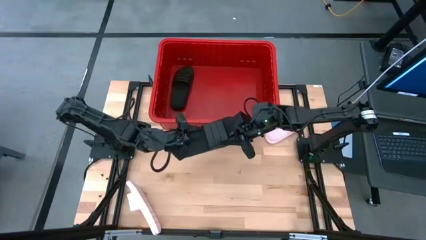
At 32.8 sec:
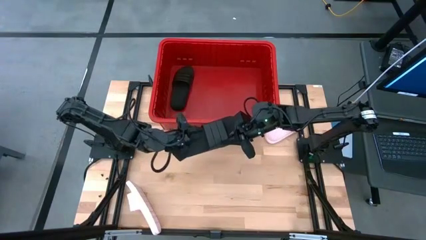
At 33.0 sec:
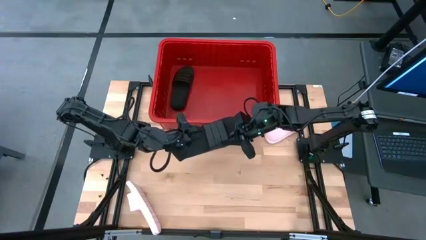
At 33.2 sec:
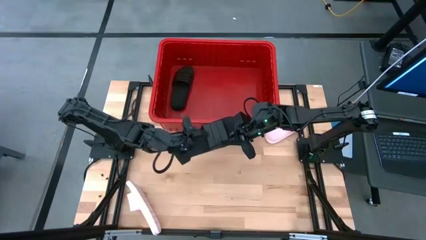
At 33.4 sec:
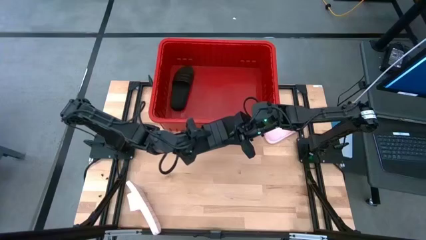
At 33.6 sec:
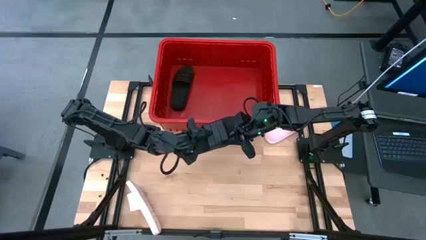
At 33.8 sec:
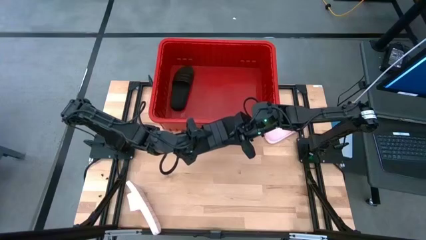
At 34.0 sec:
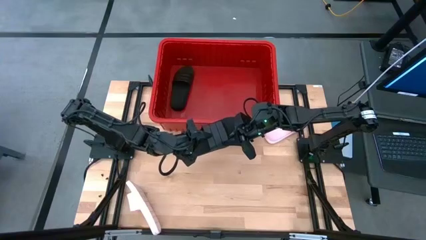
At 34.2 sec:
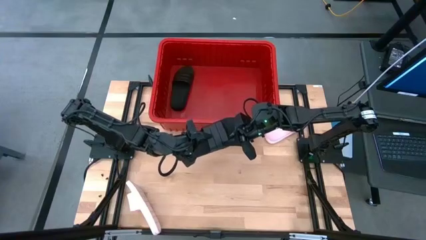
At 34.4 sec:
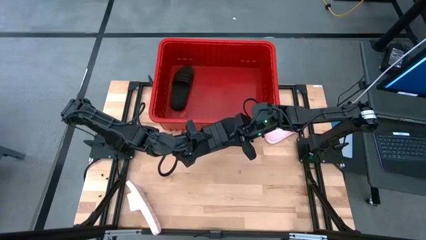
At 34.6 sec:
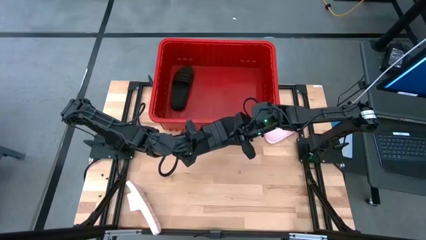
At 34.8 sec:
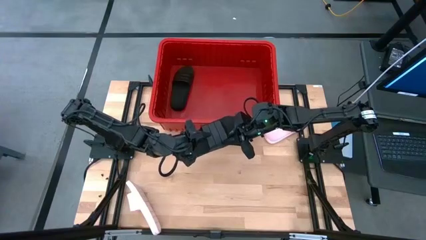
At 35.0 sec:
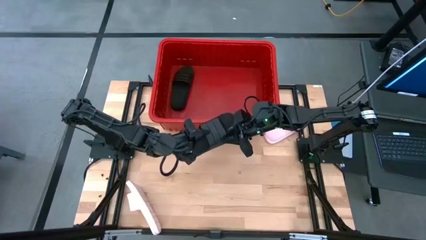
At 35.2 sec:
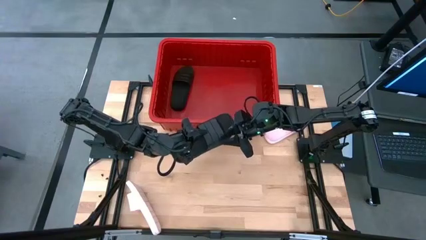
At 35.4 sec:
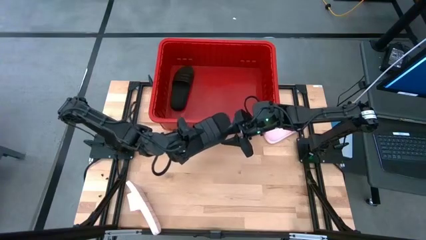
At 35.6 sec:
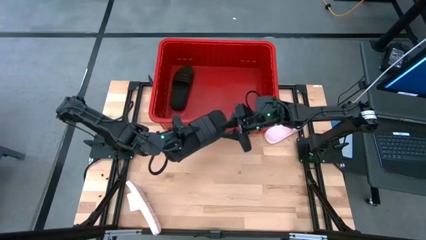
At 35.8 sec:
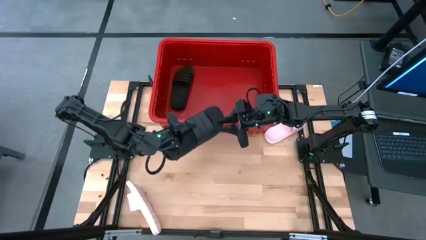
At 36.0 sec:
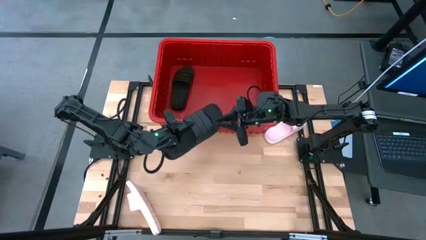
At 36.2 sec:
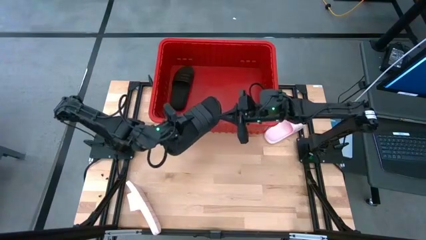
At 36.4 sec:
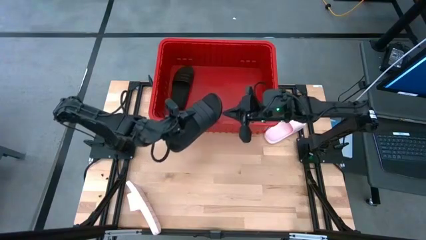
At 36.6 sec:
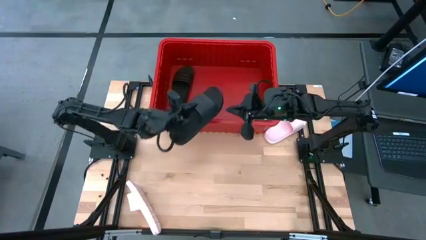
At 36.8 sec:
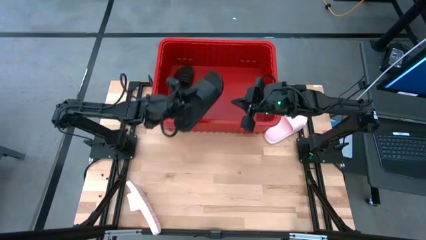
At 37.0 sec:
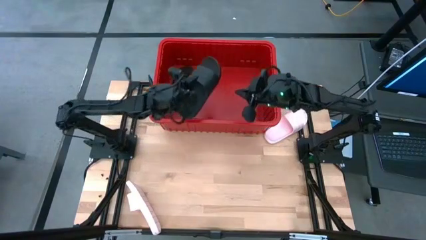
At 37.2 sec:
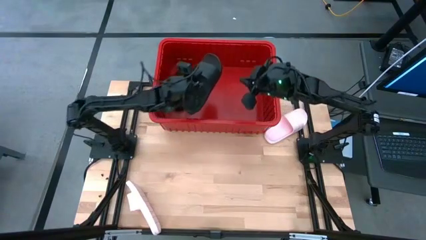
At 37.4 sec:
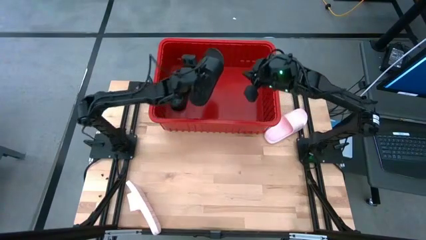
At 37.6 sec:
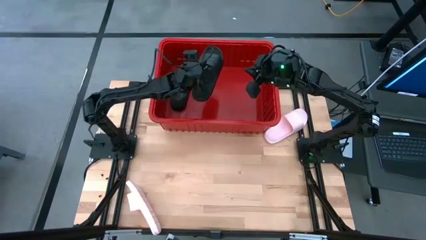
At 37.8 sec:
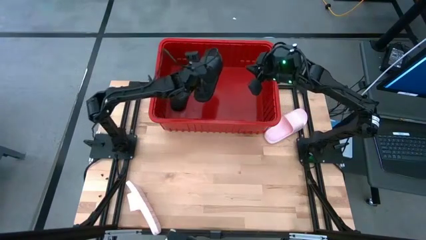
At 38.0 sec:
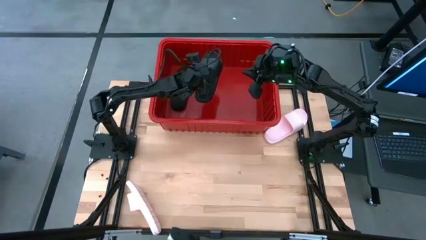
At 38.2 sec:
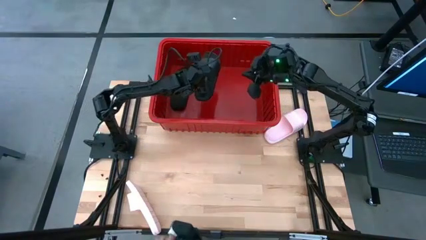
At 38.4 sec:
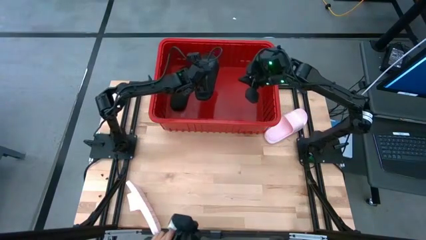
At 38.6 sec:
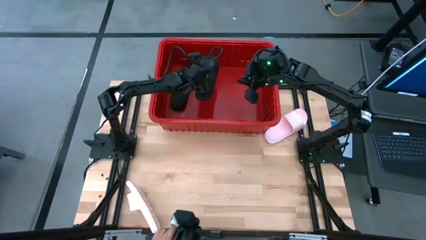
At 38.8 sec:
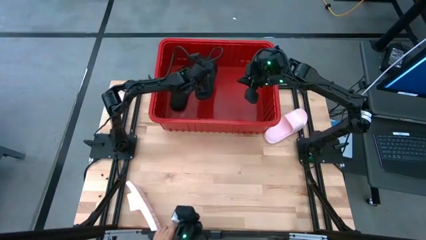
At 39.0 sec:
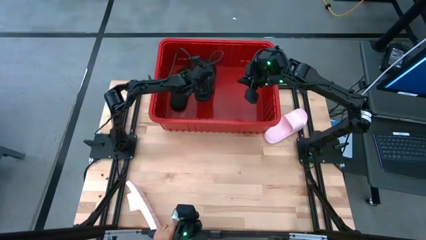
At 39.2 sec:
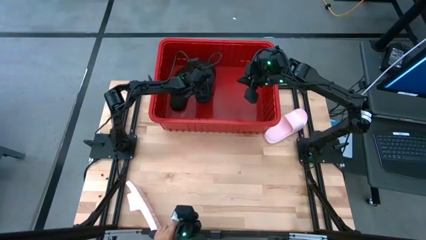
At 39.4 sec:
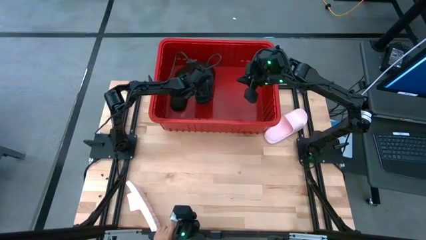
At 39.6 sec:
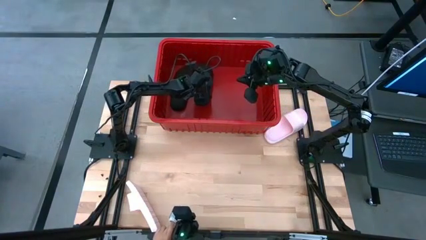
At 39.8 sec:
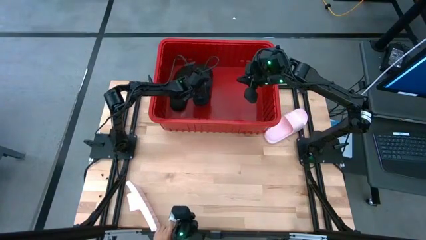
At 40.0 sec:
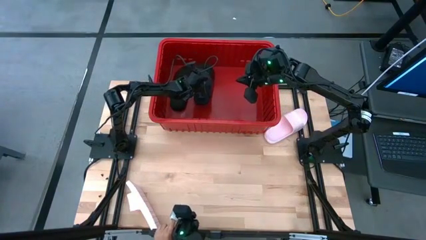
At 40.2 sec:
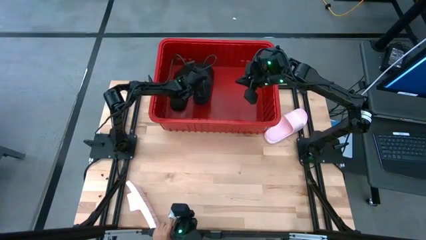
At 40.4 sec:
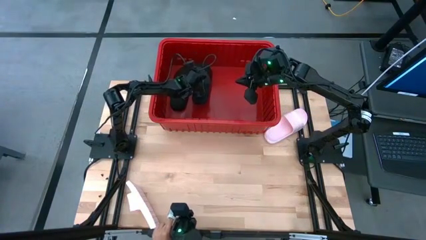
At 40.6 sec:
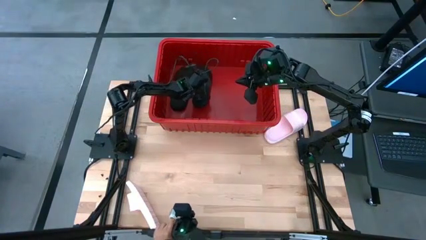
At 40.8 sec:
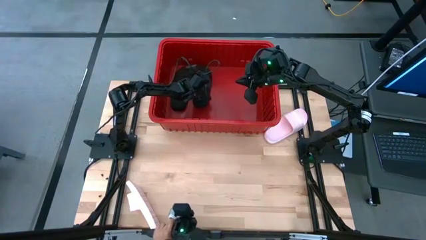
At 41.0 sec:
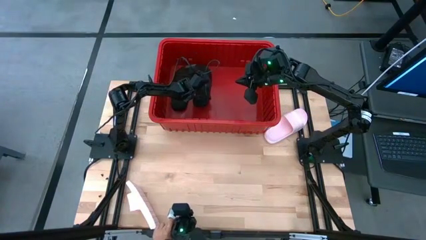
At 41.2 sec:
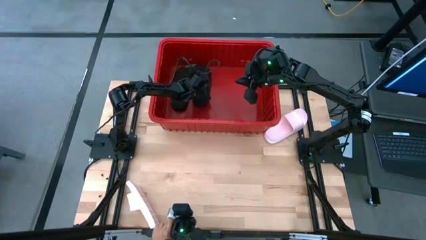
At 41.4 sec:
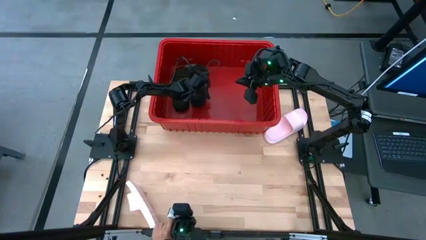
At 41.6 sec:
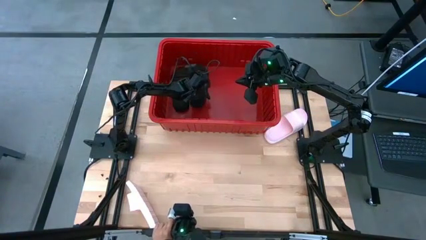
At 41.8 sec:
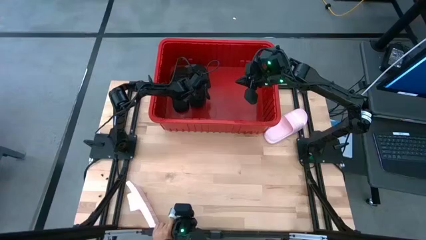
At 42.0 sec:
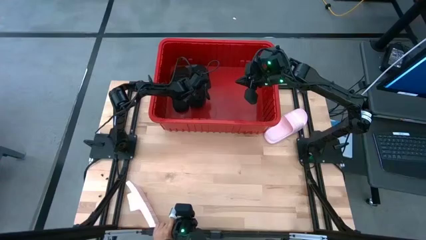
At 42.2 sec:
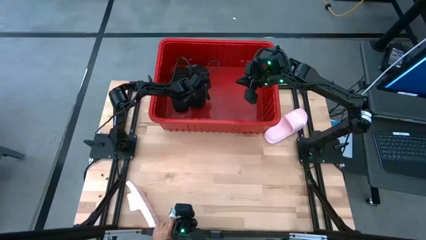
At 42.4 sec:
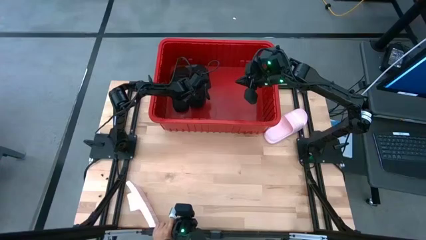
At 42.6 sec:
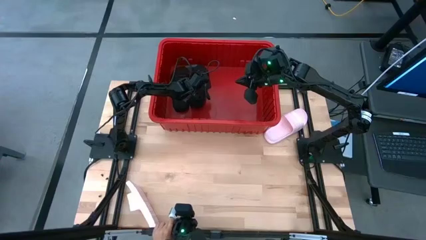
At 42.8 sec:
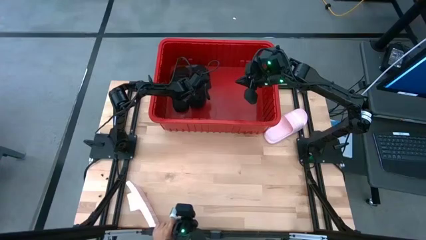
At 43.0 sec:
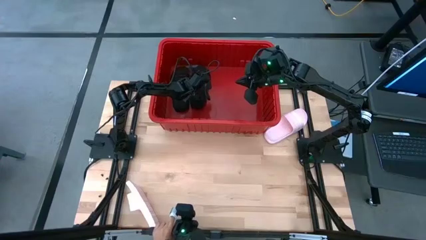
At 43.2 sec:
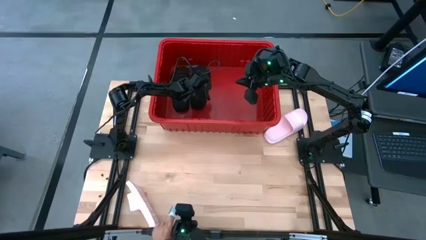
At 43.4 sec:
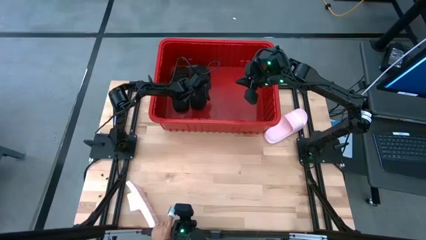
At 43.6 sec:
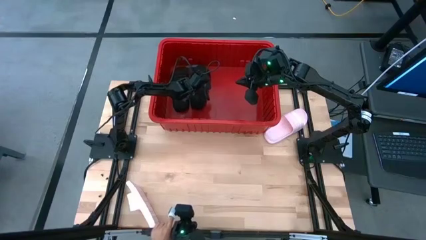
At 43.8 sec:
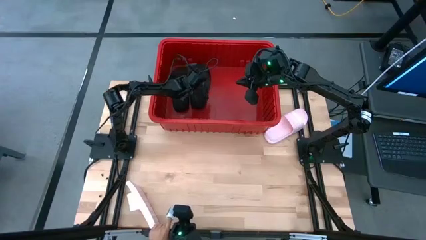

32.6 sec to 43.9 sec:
Task: Pick and place slides into bin
Put the black slide into the red bin
